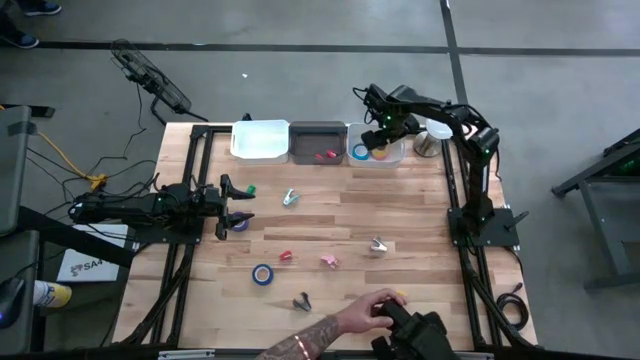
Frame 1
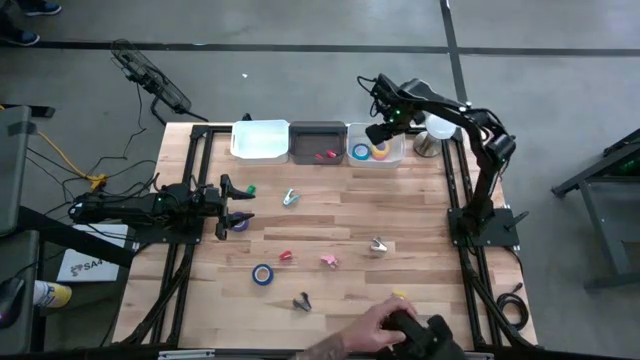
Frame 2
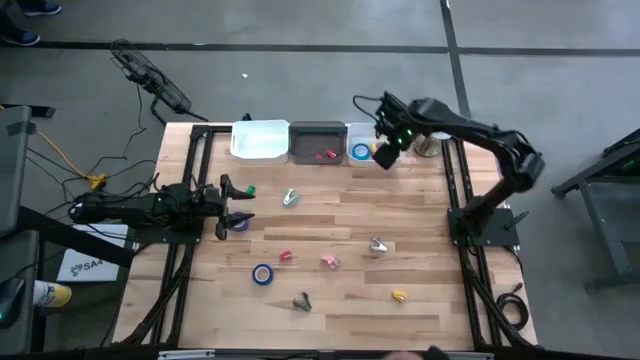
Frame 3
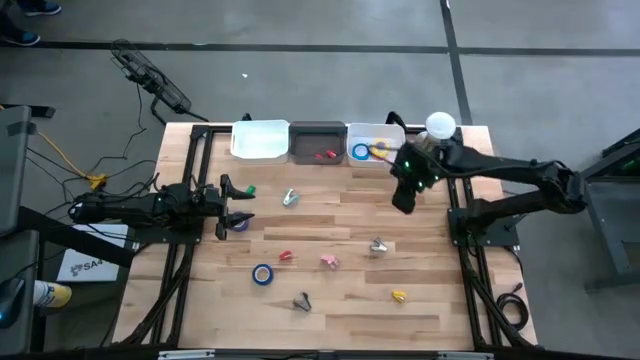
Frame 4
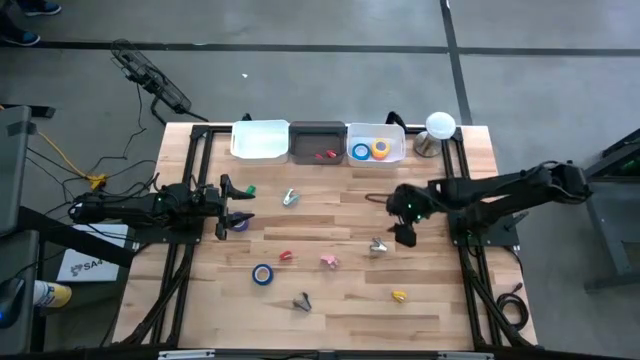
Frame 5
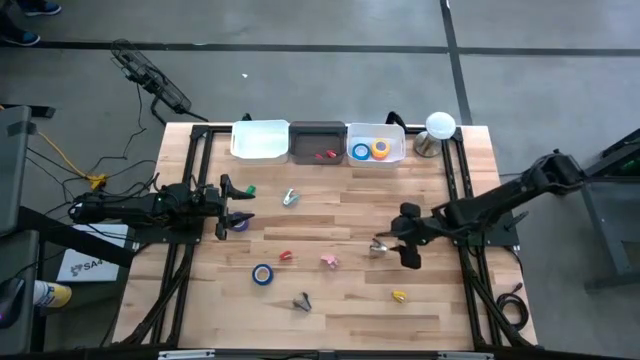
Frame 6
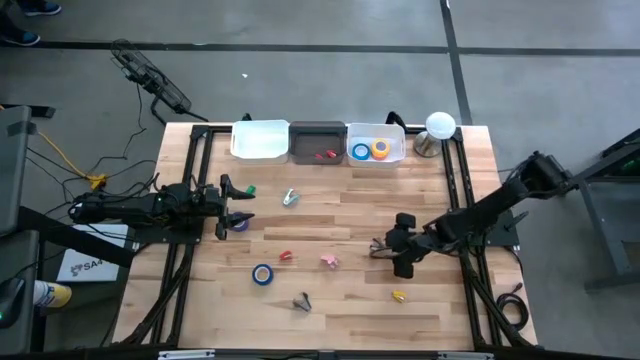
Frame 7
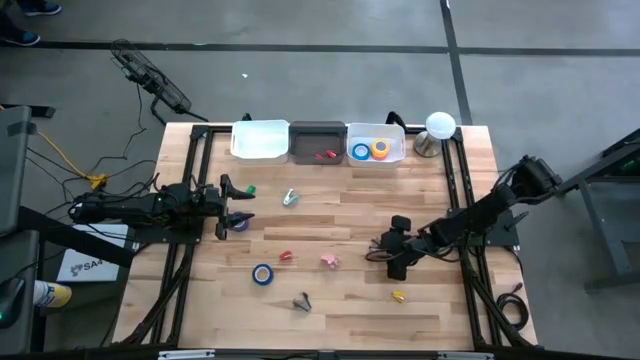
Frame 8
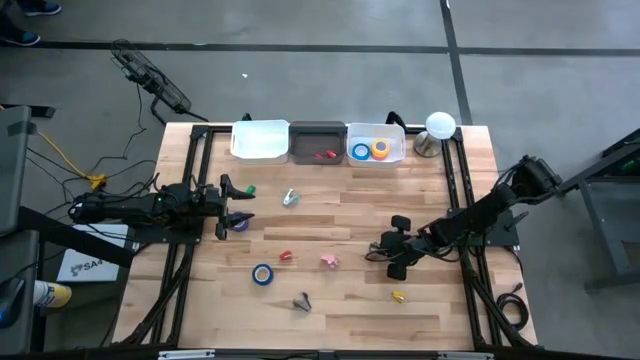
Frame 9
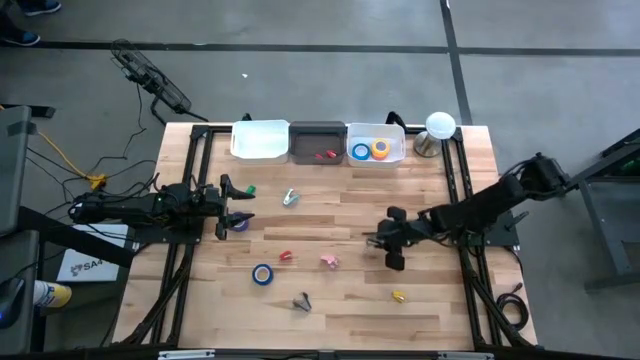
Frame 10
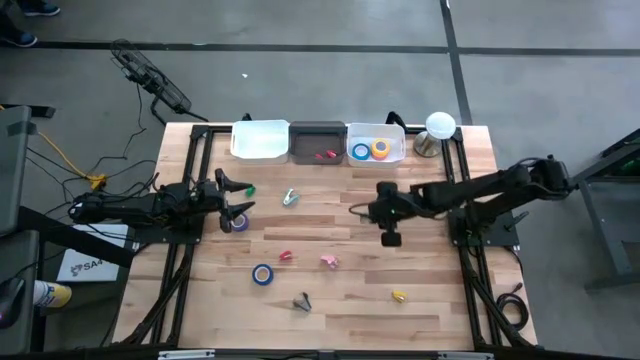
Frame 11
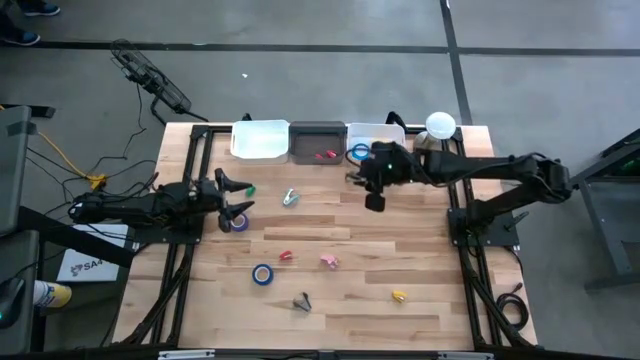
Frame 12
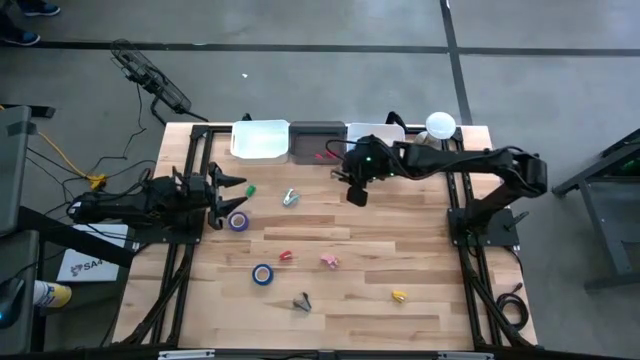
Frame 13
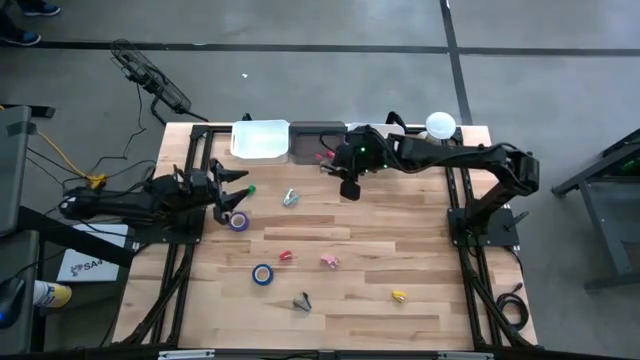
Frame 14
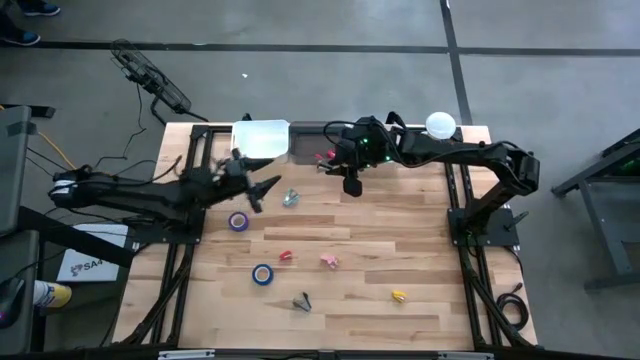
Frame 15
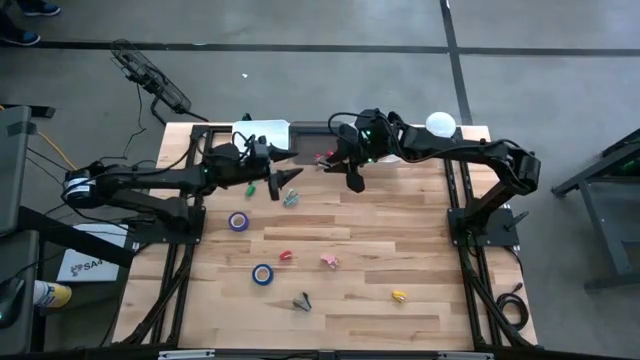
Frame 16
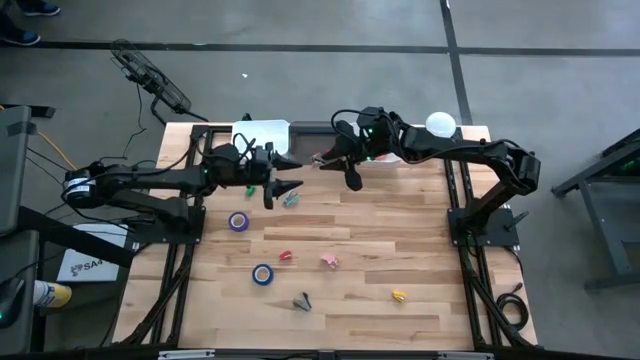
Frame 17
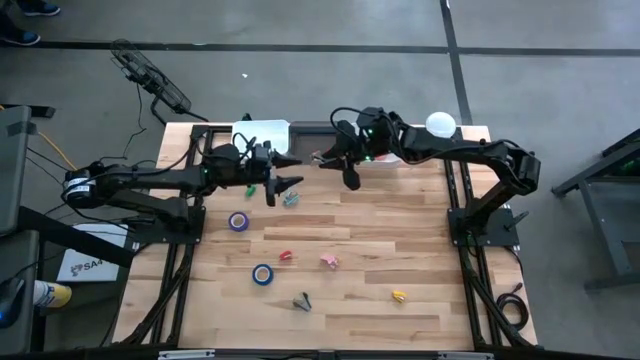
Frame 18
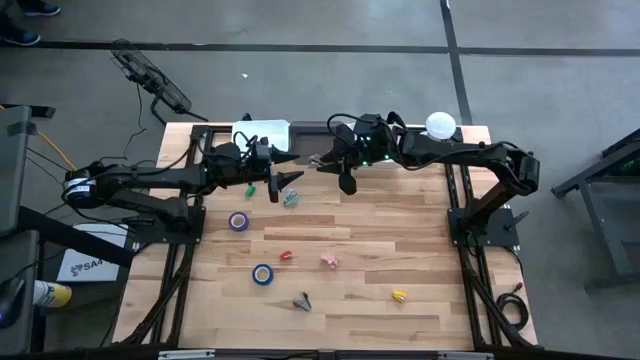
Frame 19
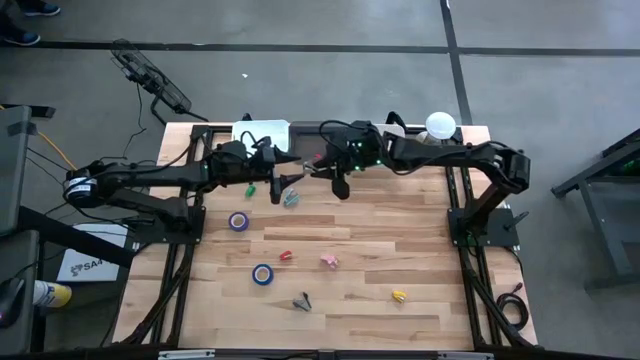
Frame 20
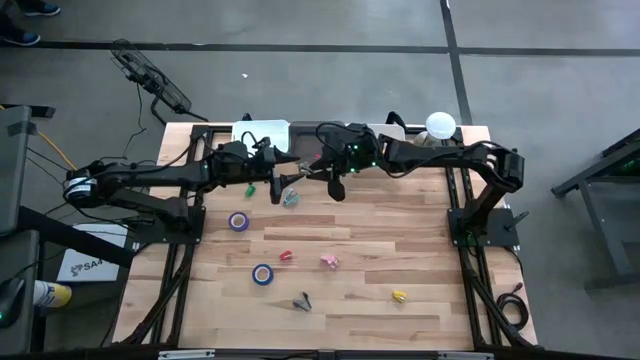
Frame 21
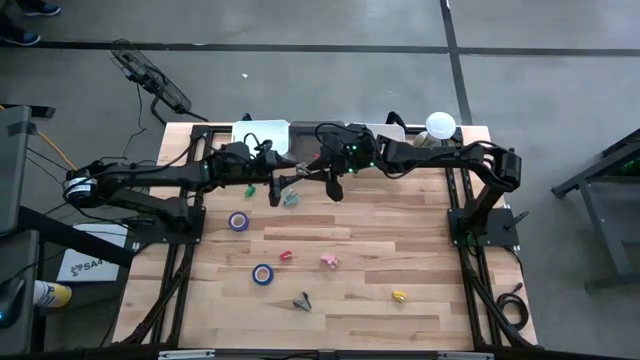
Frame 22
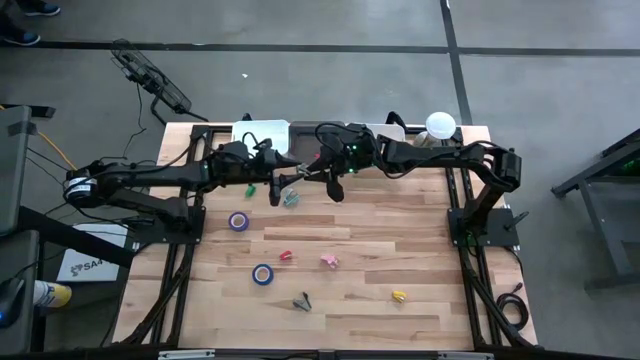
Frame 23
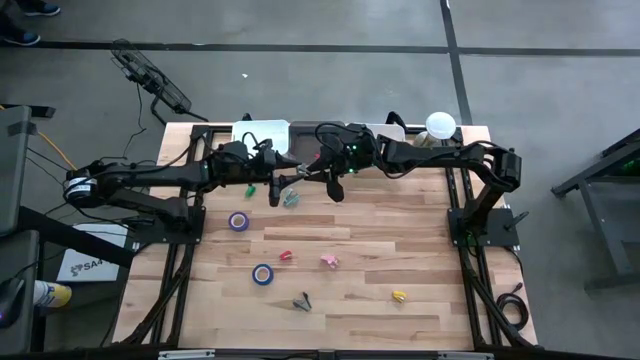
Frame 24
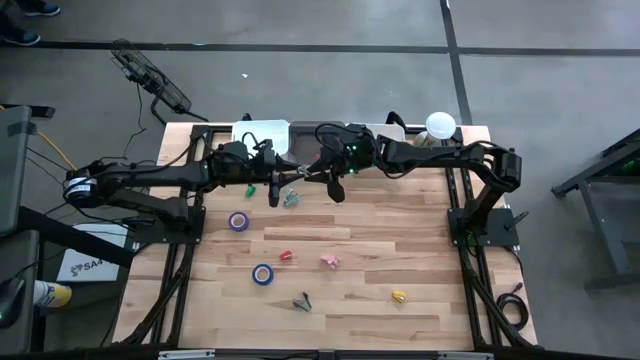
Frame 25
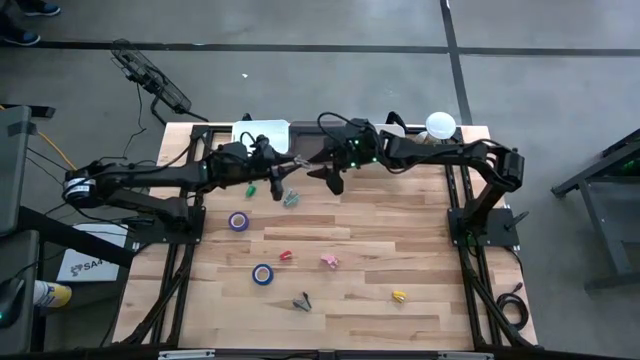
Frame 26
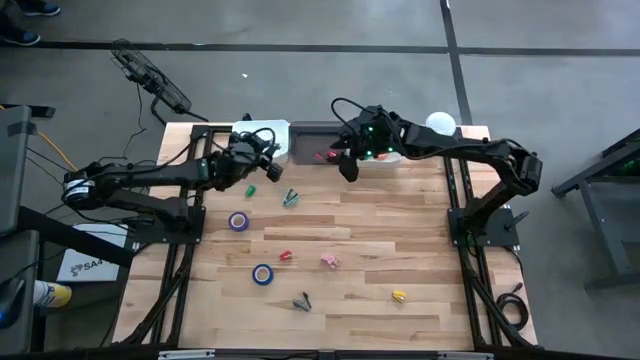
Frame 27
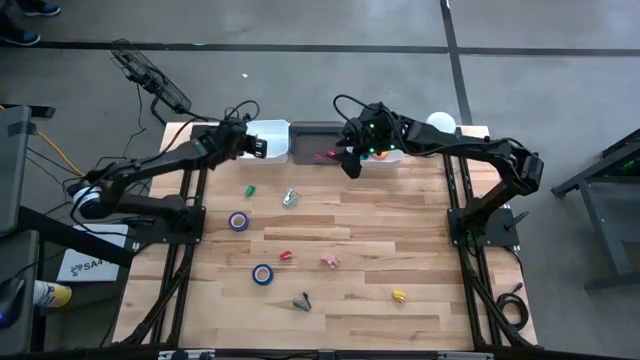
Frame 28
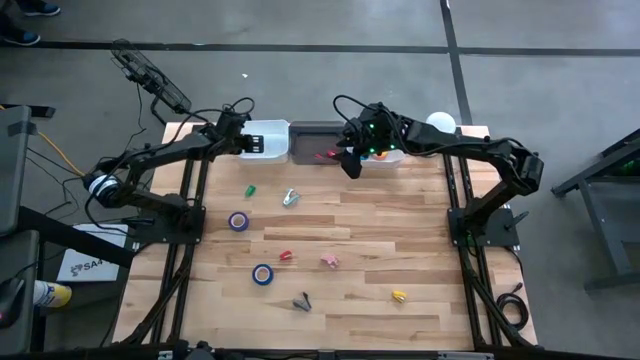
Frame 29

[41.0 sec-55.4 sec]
Task: Pick and place Stapler, Stapler remover, tape
Put the gray staple remover into the left white bin

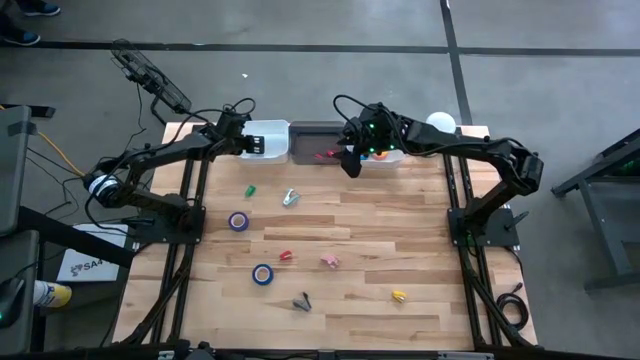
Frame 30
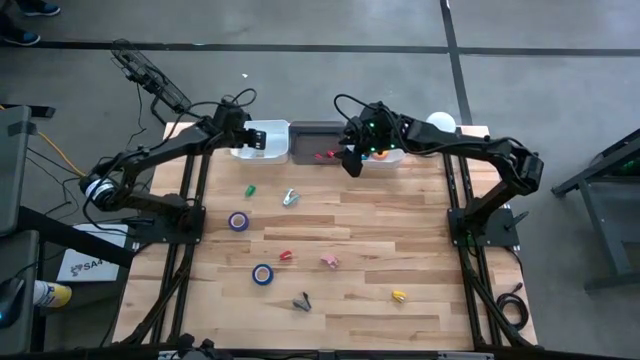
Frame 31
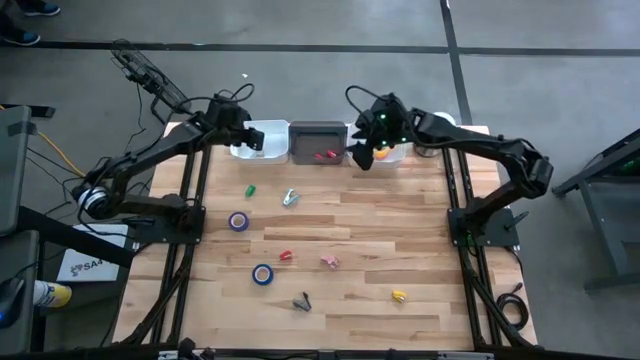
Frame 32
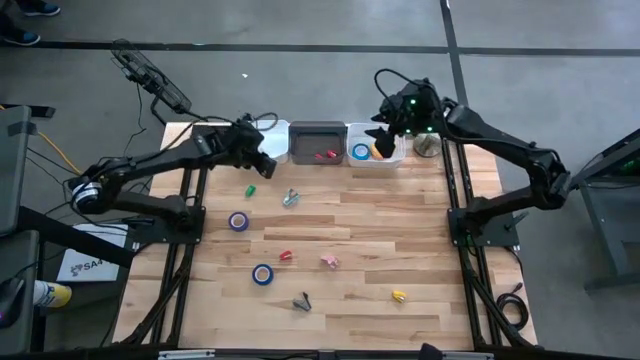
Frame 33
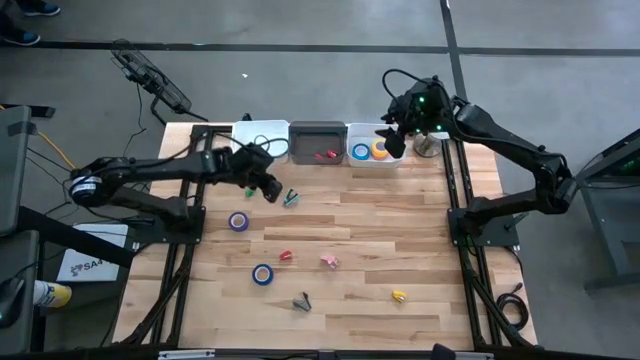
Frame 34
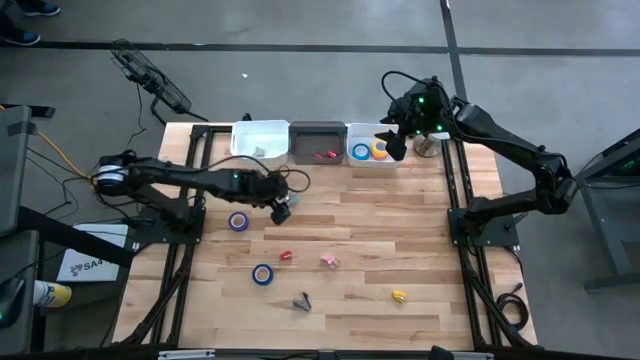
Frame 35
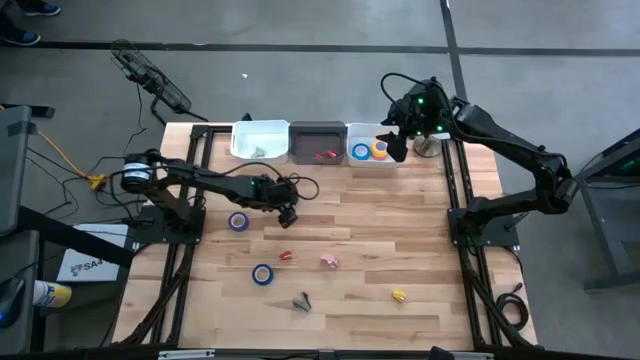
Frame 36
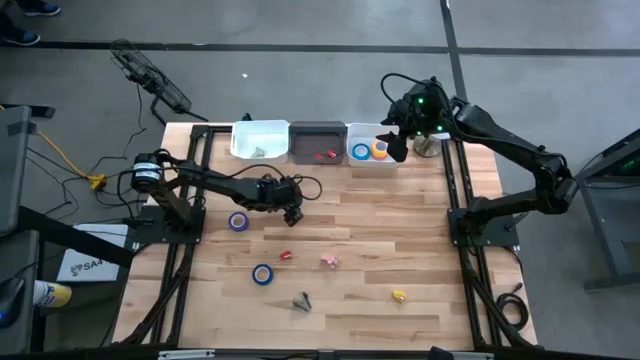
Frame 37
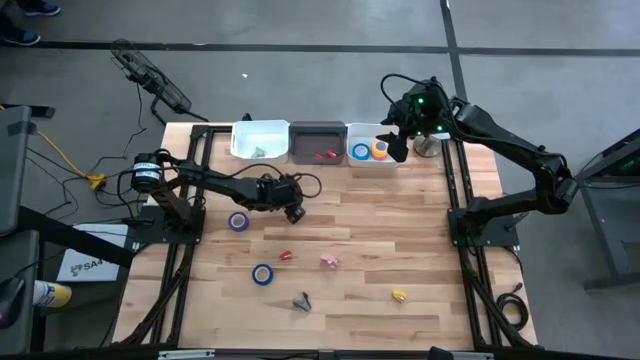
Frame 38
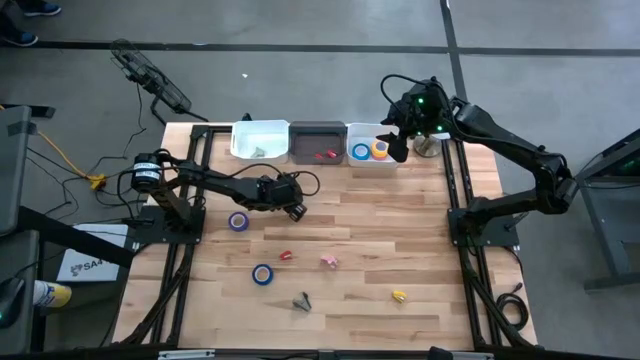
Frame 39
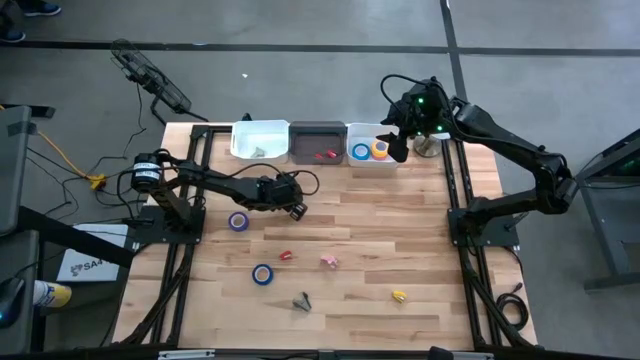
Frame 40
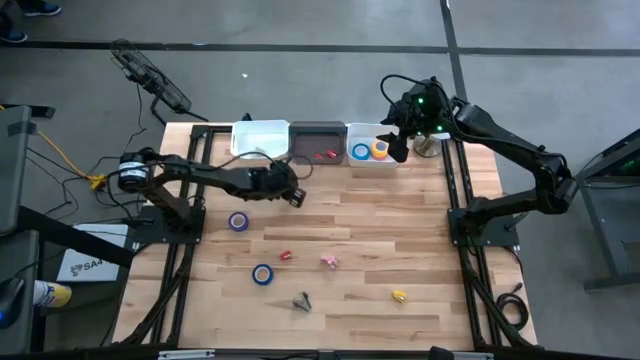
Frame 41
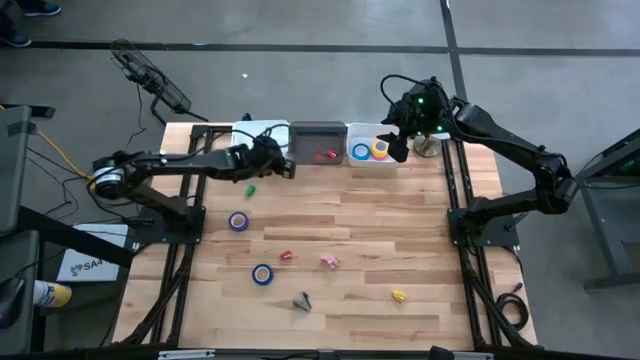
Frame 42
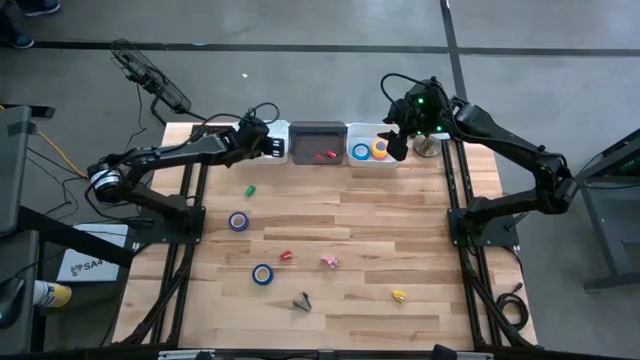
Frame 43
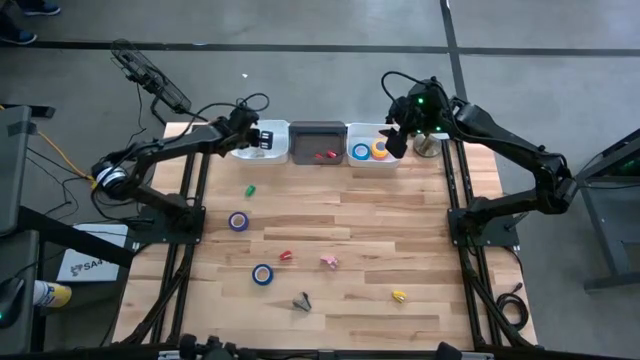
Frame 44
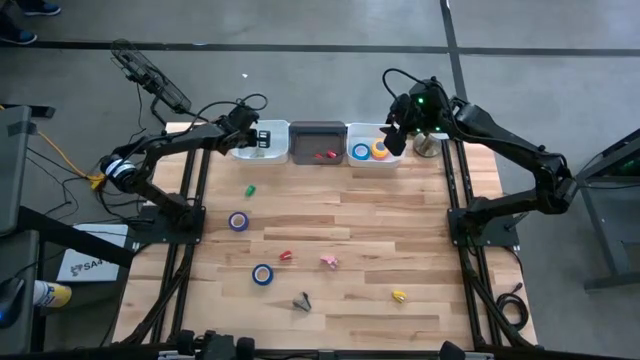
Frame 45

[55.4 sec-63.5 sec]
Put the blue staple remover into the left white bin
